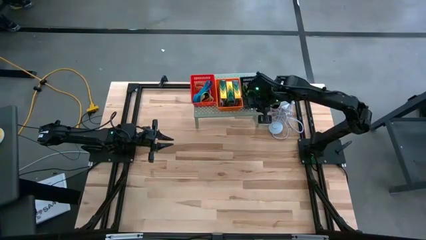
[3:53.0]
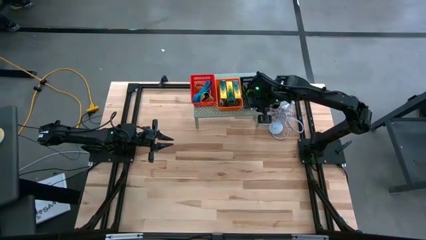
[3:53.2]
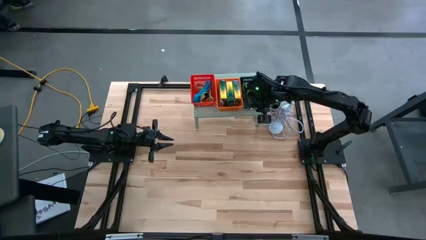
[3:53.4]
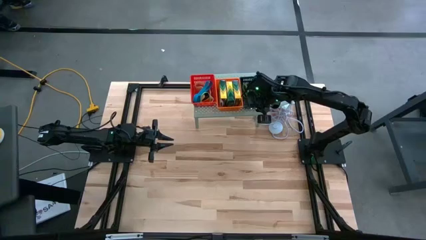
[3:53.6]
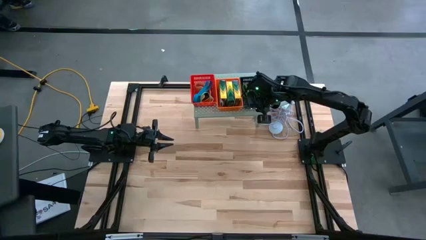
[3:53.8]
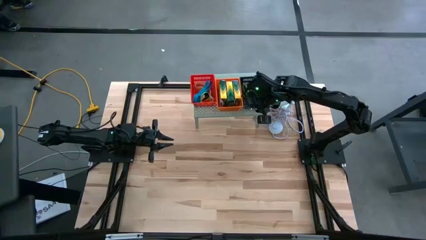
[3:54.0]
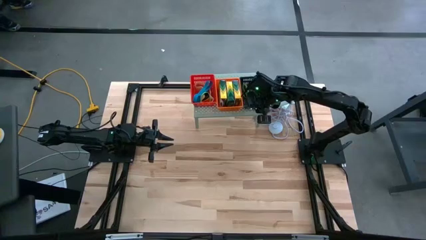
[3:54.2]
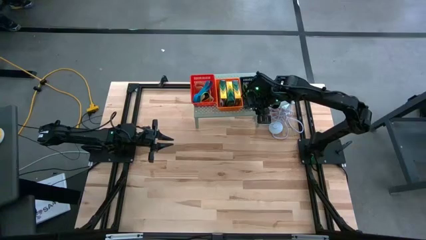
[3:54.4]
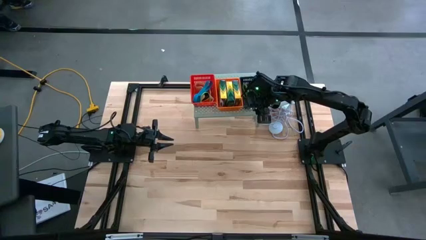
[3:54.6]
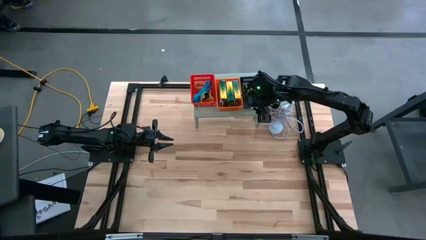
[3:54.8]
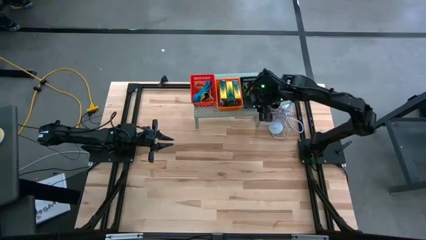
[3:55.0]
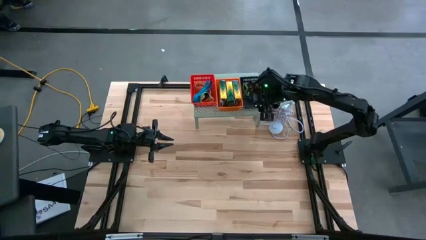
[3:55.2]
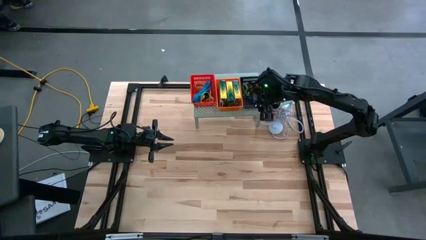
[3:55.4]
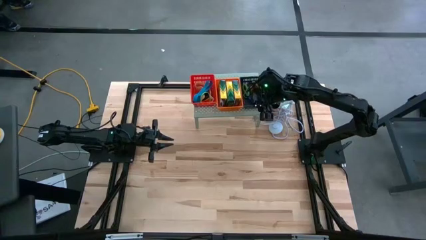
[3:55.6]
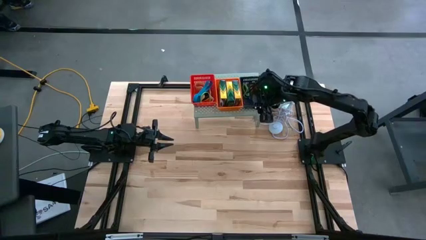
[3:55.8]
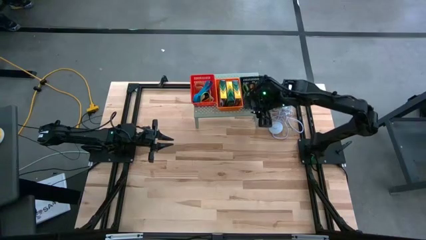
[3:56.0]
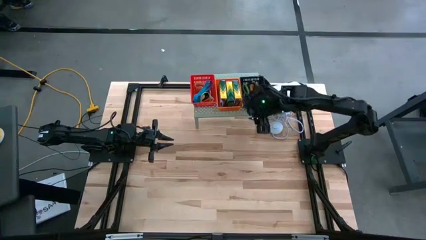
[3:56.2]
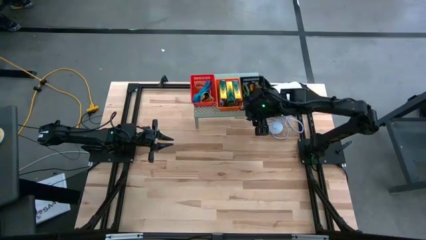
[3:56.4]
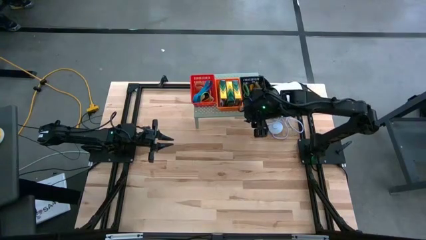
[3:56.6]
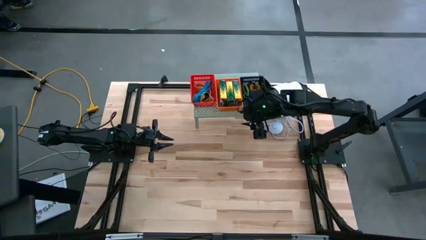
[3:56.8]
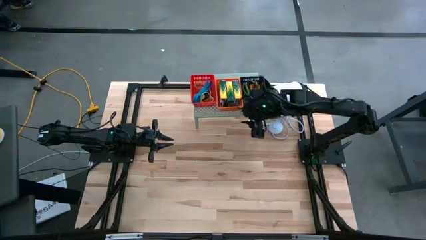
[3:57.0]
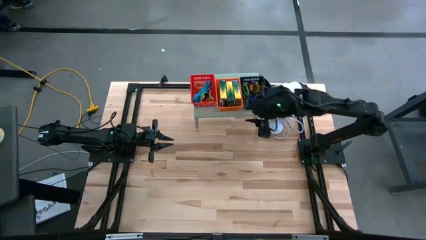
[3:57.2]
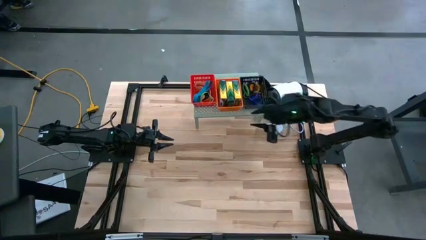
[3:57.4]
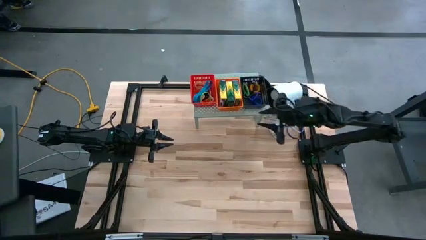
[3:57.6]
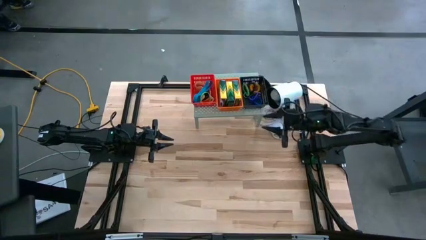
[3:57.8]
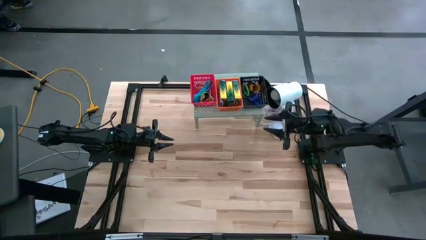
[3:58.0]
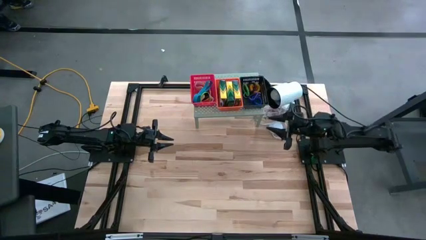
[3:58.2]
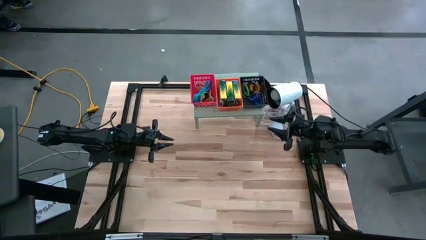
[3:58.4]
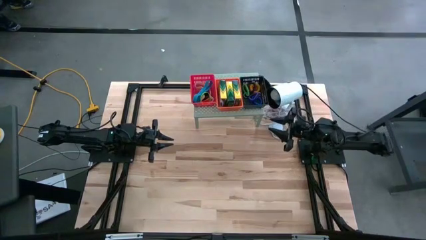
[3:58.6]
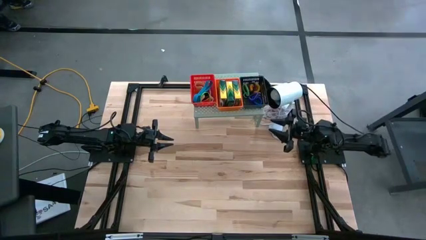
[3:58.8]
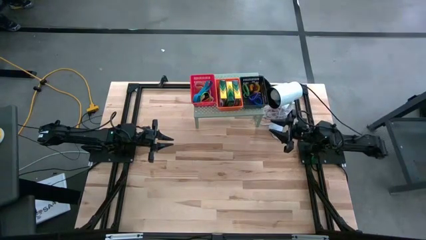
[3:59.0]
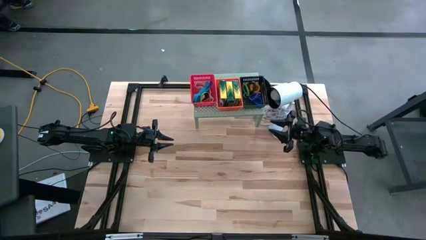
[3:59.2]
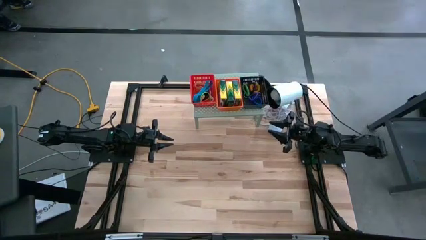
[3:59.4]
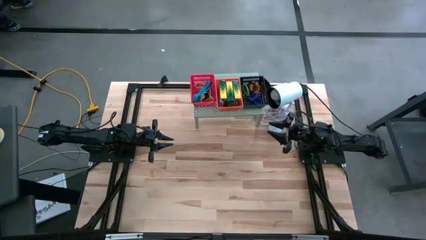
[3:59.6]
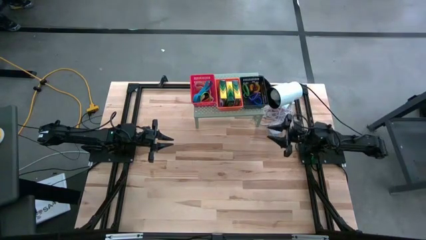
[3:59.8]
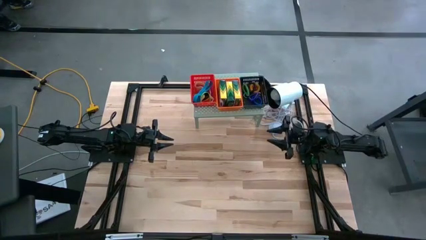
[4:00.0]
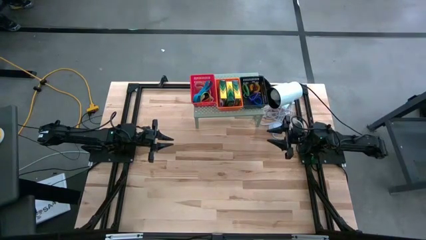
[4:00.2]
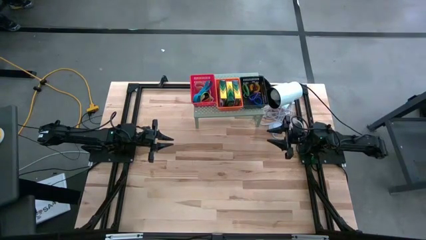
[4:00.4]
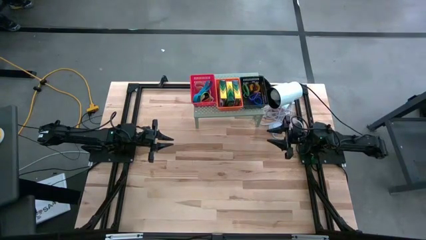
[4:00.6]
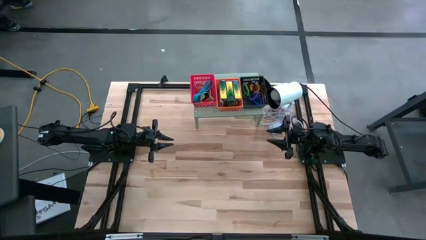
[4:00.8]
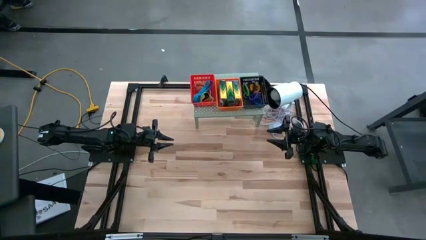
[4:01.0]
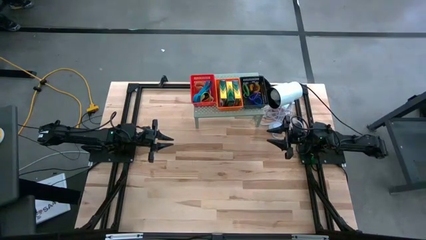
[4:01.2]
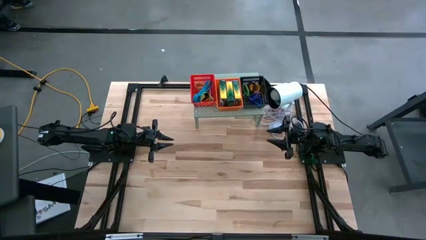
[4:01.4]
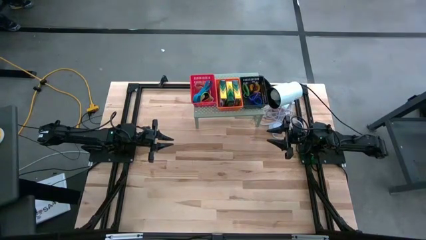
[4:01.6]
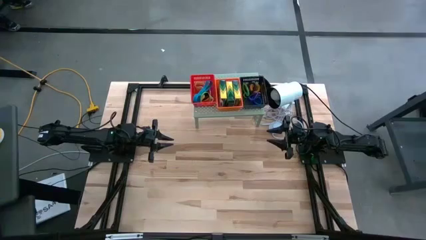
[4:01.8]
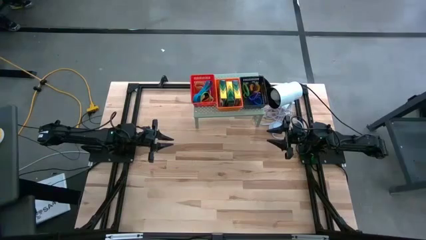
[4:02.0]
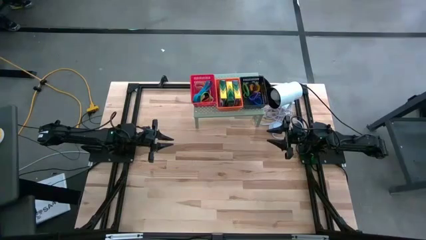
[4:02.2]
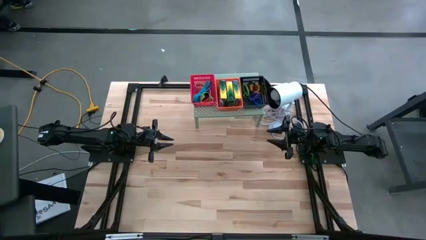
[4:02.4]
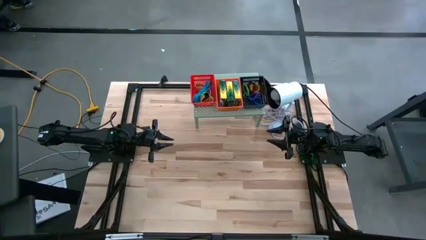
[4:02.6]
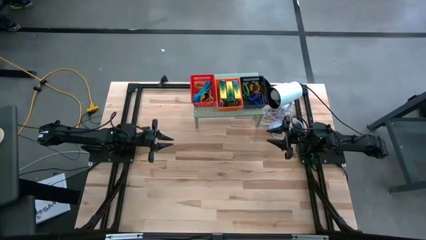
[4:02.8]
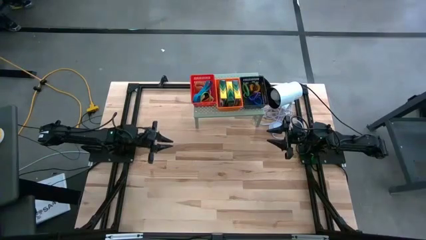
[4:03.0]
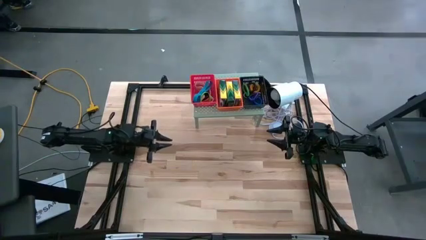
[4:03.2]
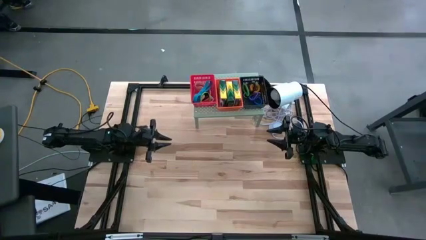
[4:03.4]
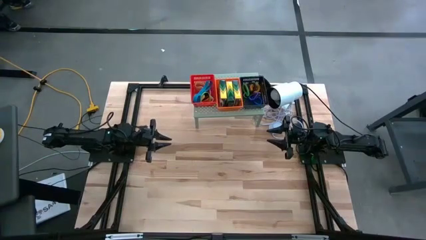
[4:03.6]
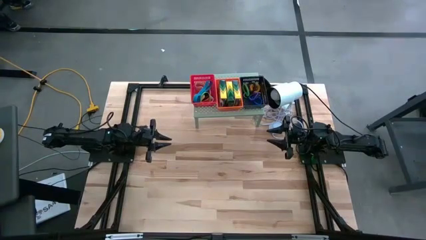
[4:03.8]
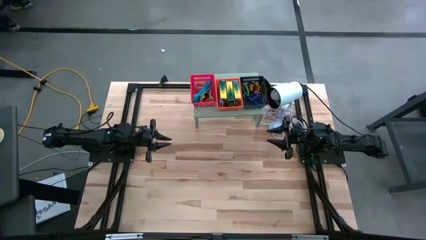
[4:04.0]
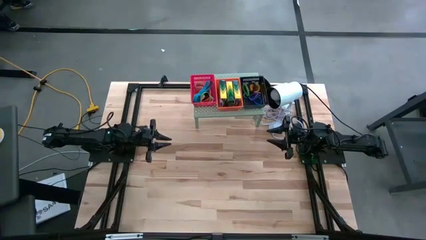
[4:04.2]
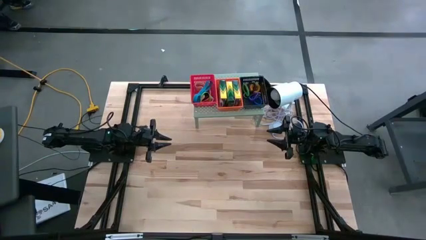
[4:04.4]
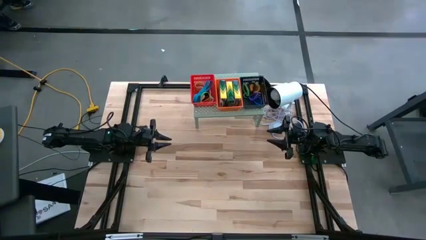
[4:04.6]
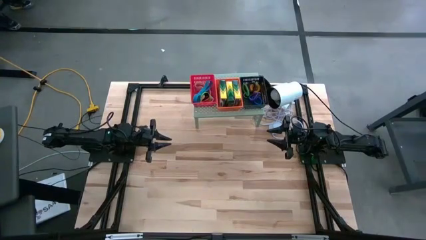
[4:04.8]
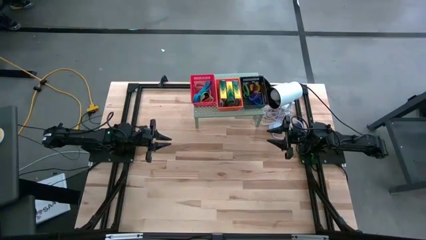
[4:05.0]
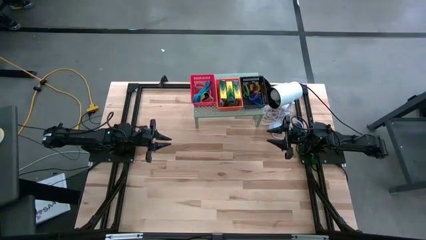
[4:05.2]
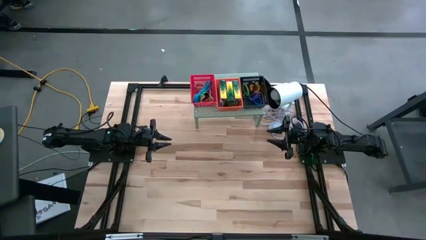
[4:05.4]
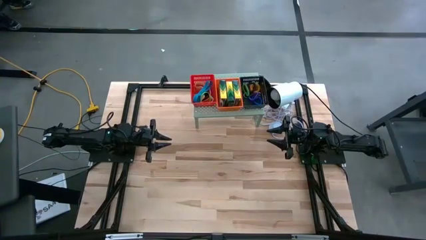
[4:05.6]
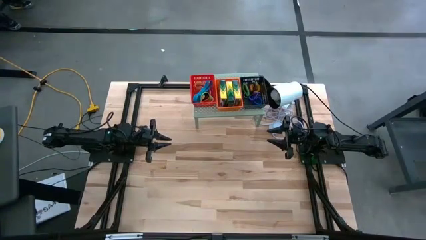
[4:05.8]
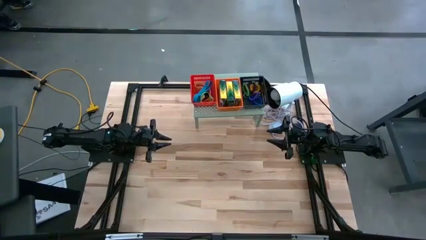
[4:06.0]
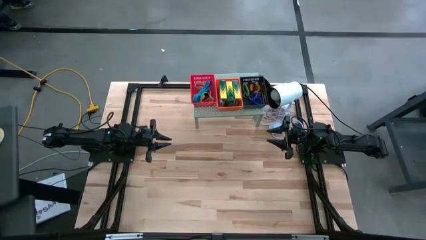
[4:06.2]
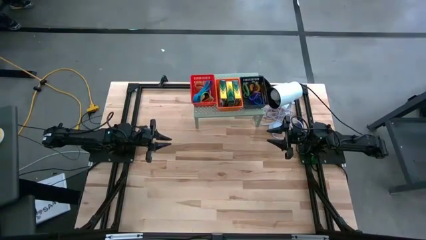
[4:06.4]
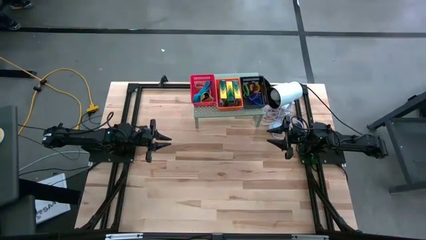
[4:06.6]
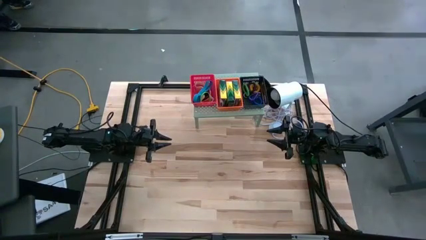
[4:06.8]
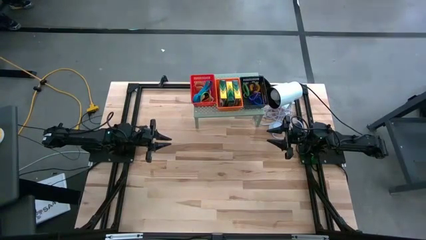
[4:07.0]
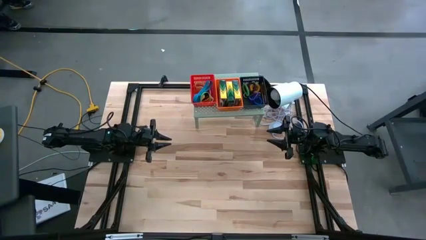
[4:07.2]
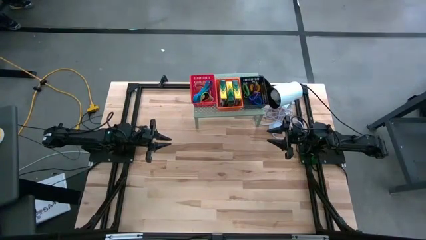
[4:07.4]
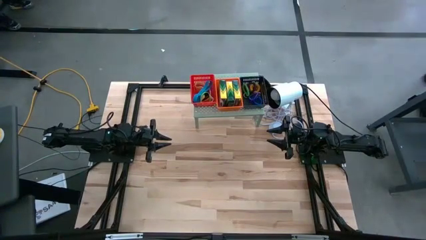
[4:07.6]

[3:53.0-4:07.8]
Task: Pick & Place Office Desk Supplies
Return to Home Position

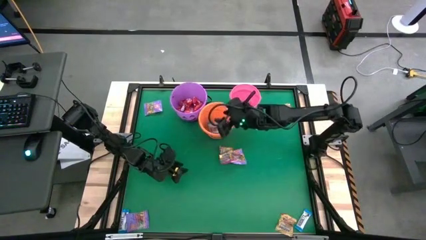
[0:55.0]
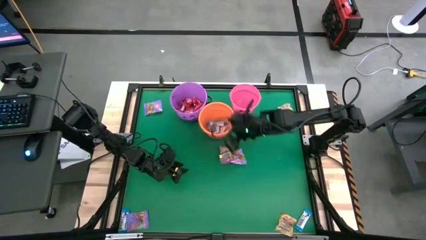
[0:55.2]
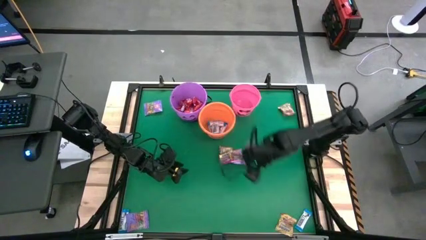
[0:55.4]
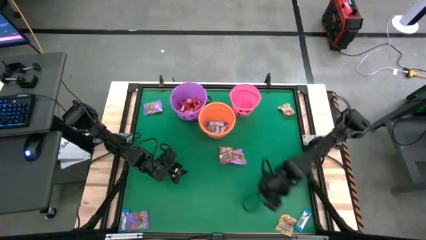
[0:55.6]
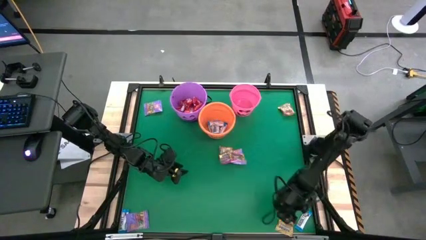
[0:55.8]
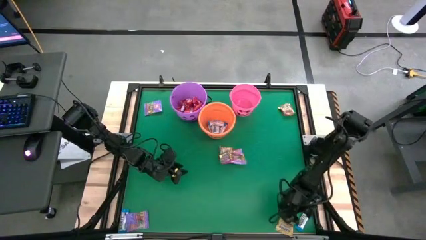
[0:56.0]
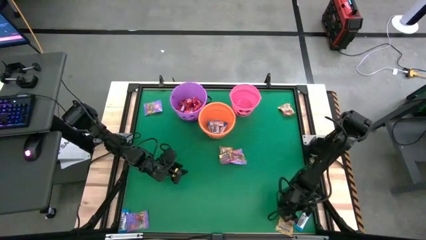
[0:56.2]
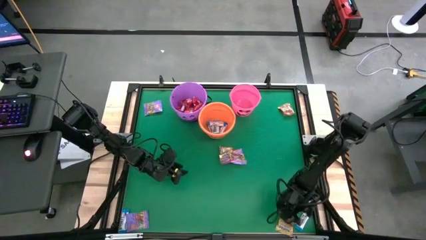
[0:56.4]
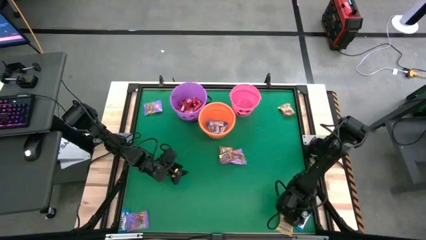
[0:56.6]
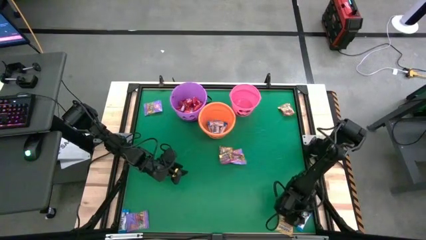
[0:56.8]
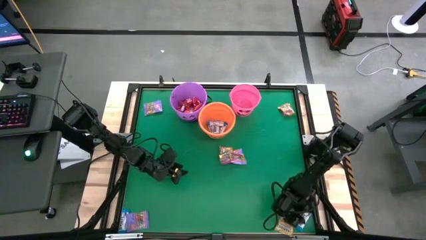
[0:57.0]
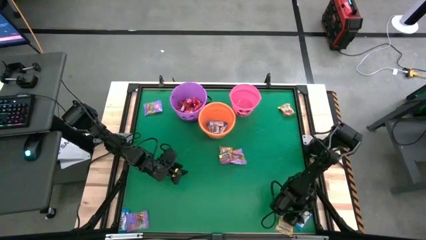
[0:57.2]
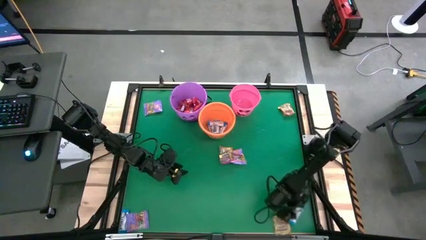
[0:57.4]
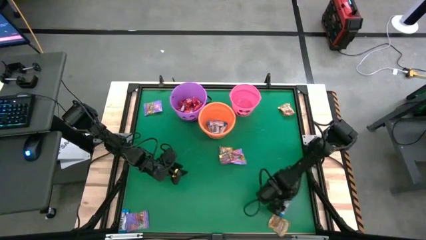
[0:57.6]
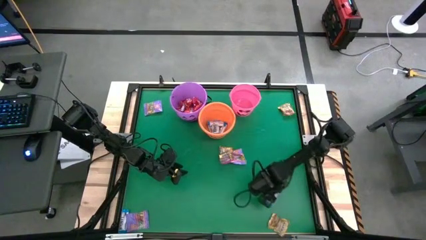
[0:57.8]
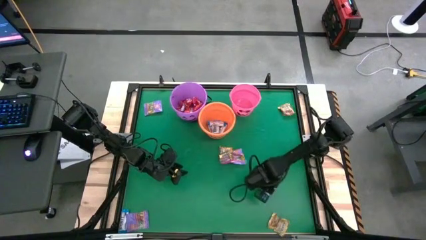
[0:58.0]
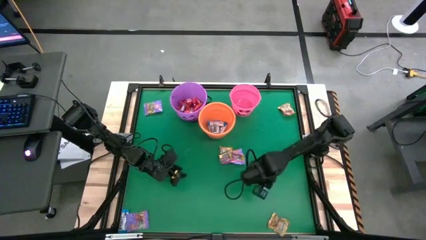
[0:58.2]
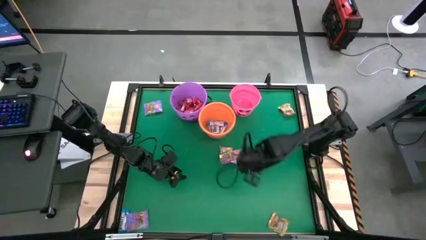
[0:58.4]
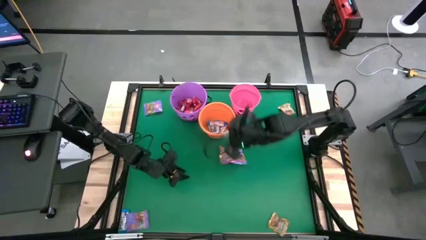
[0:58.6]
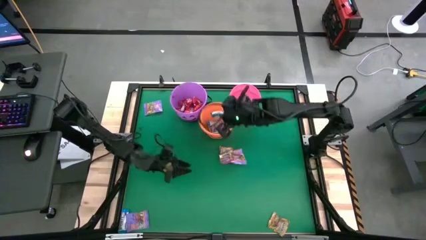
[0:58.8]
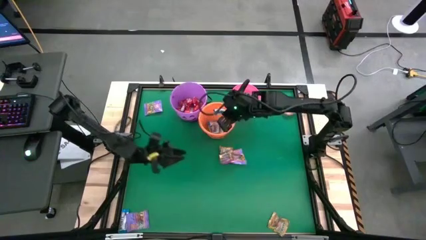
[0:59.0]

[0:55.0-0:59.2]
Task: Sort candy by brand, put in halloween buckets
Put the white chocolate into the orange bucket
